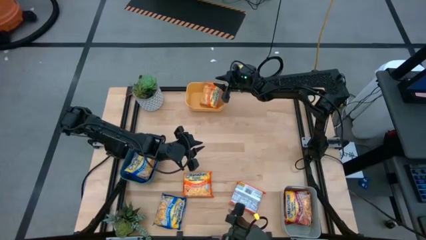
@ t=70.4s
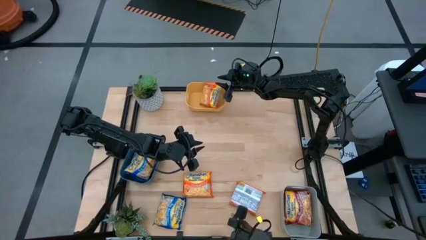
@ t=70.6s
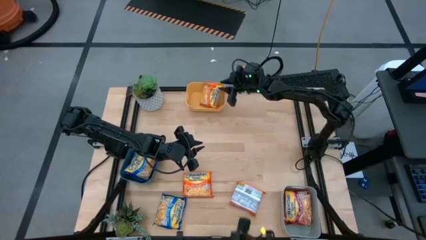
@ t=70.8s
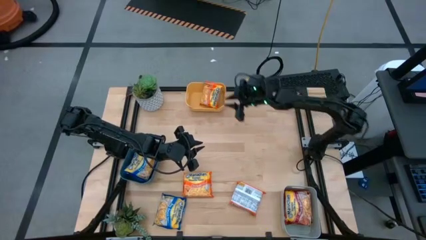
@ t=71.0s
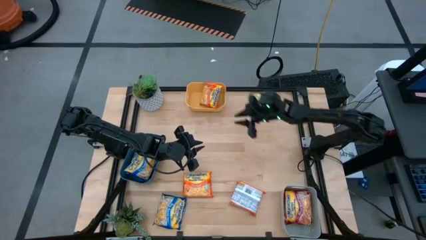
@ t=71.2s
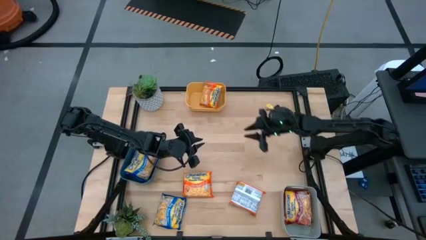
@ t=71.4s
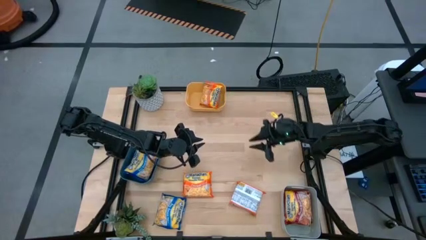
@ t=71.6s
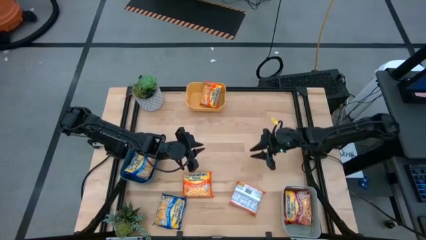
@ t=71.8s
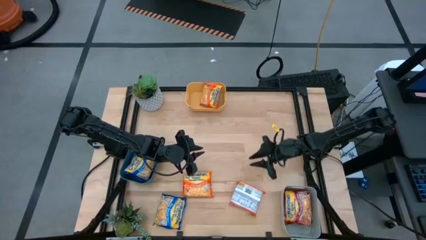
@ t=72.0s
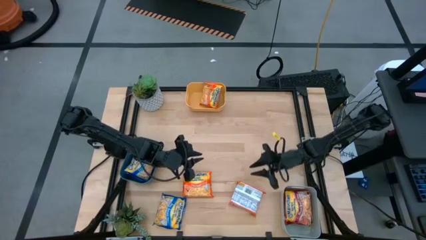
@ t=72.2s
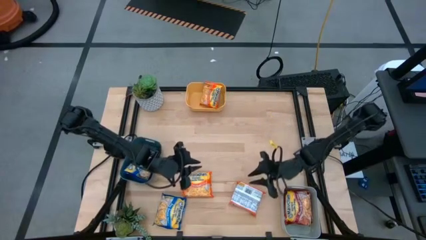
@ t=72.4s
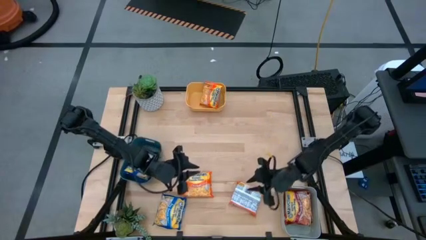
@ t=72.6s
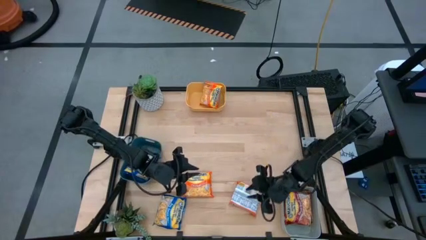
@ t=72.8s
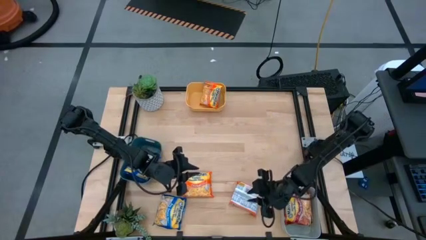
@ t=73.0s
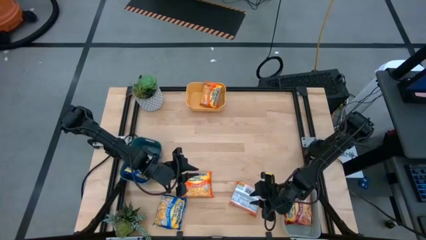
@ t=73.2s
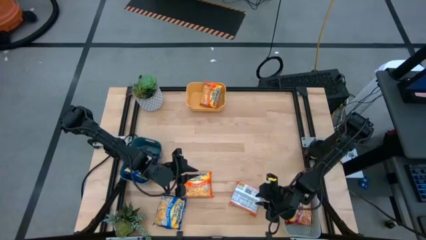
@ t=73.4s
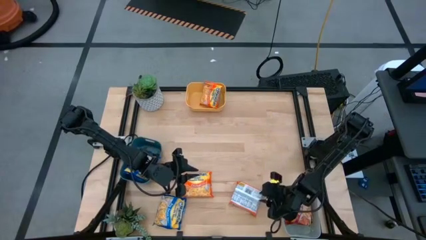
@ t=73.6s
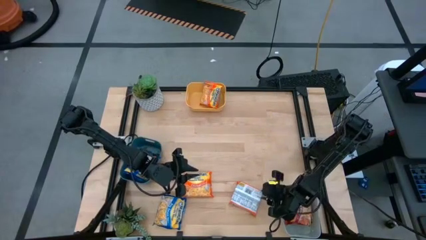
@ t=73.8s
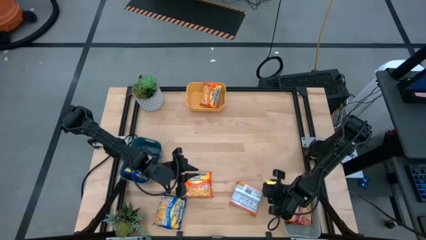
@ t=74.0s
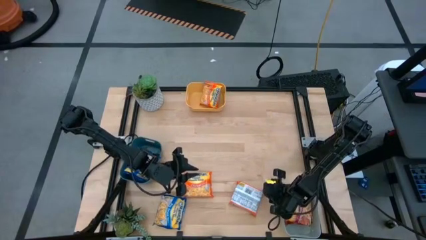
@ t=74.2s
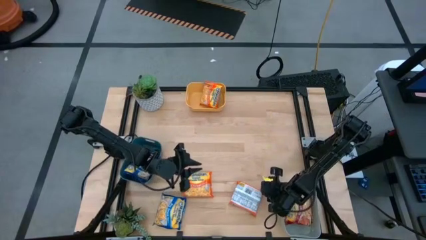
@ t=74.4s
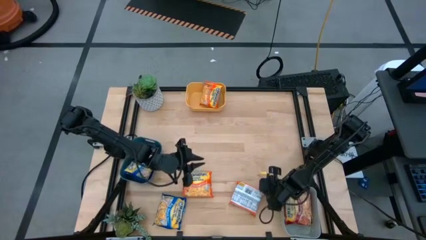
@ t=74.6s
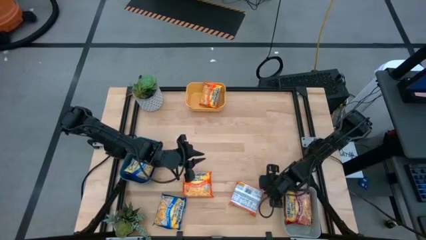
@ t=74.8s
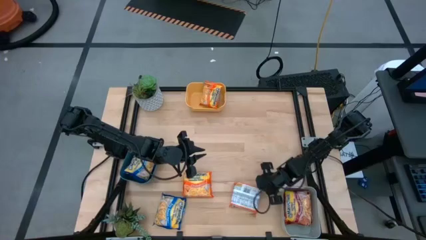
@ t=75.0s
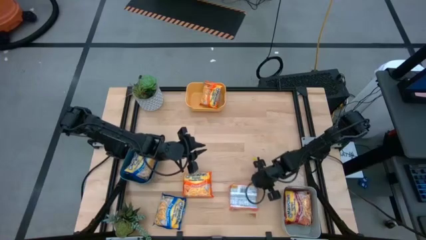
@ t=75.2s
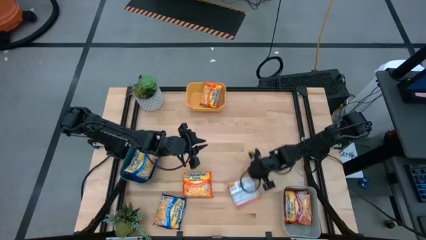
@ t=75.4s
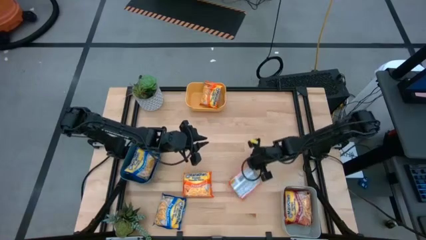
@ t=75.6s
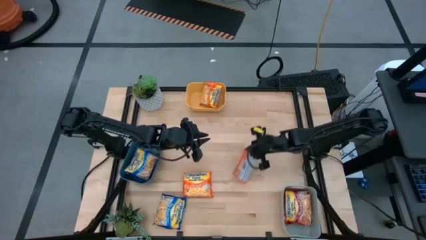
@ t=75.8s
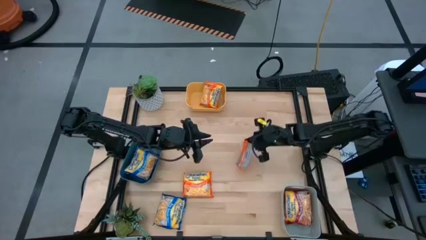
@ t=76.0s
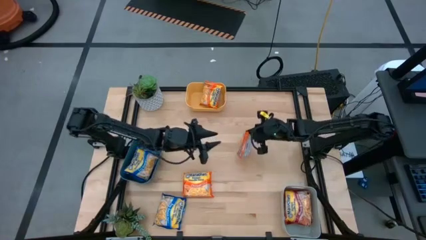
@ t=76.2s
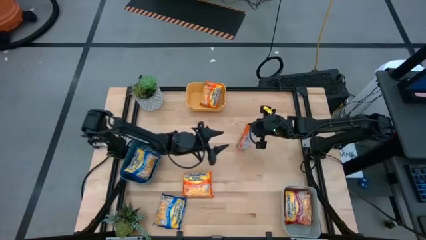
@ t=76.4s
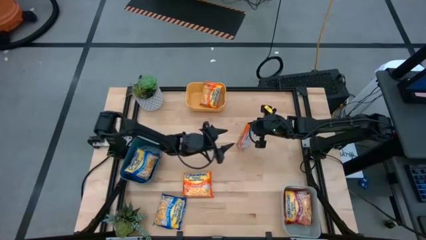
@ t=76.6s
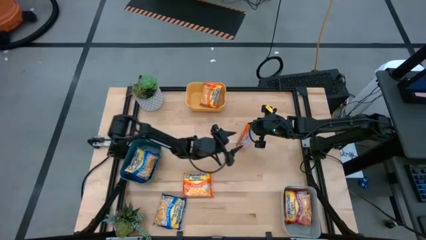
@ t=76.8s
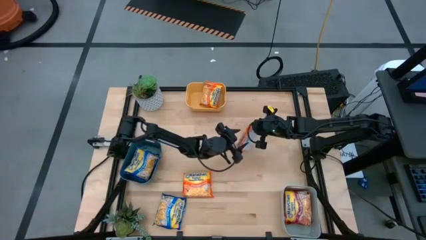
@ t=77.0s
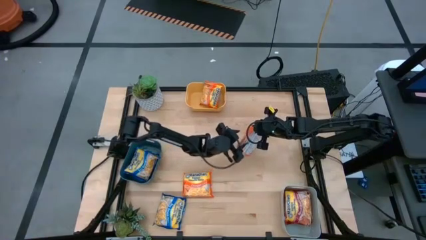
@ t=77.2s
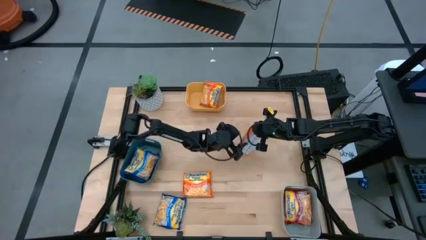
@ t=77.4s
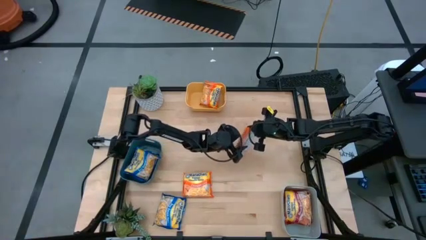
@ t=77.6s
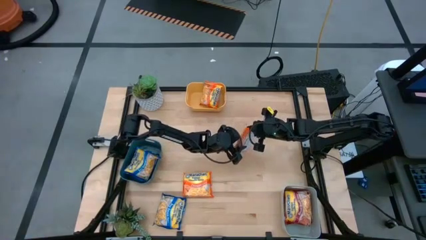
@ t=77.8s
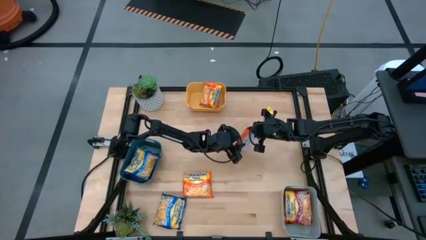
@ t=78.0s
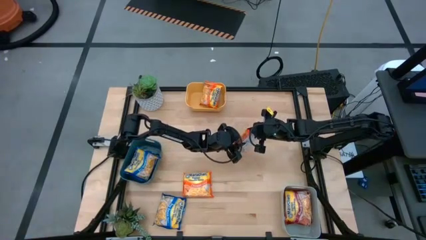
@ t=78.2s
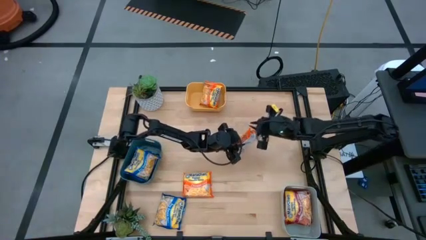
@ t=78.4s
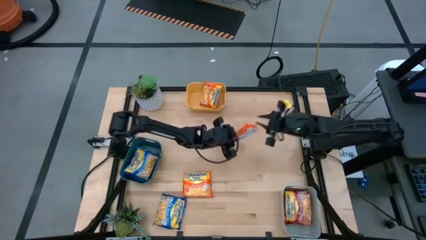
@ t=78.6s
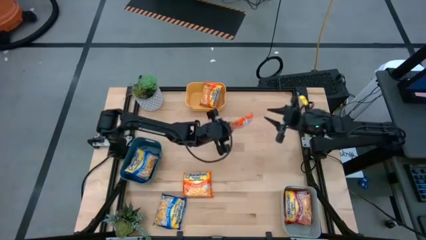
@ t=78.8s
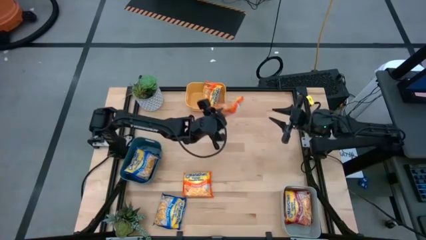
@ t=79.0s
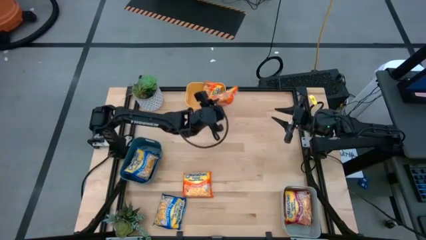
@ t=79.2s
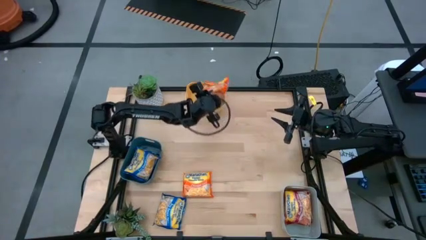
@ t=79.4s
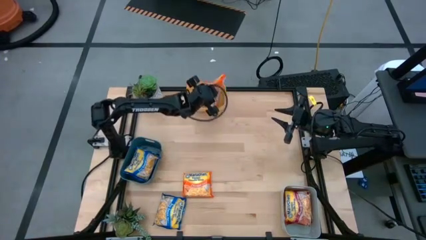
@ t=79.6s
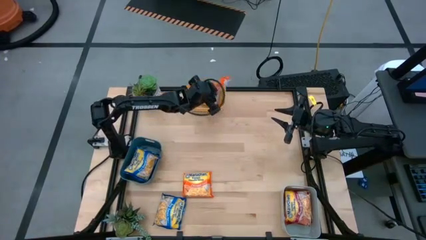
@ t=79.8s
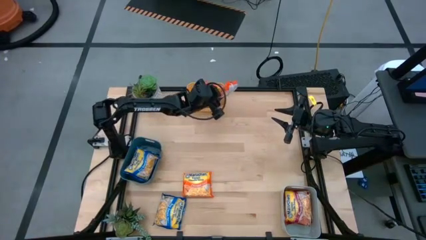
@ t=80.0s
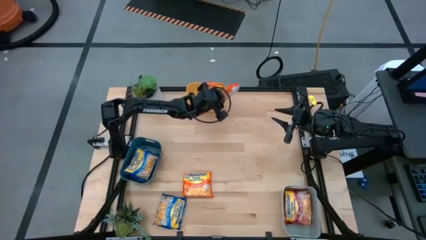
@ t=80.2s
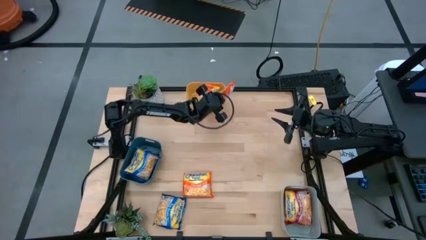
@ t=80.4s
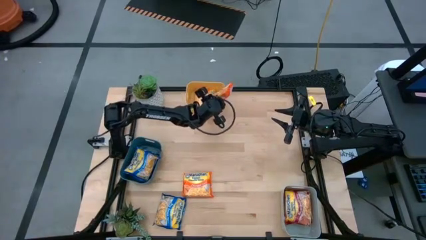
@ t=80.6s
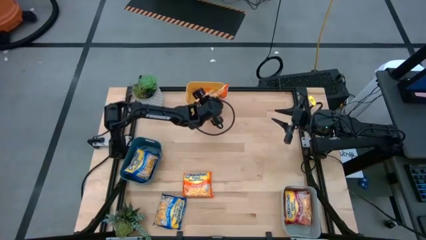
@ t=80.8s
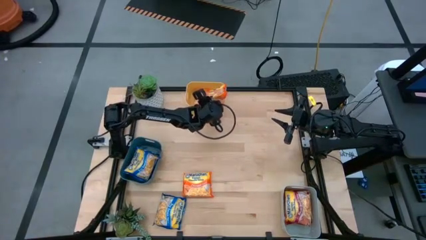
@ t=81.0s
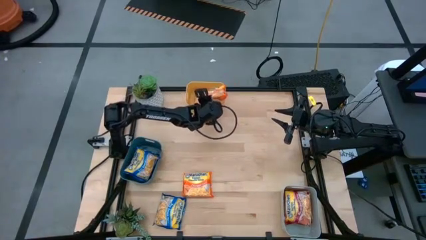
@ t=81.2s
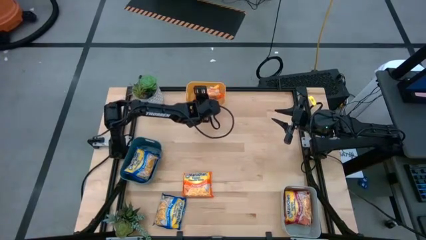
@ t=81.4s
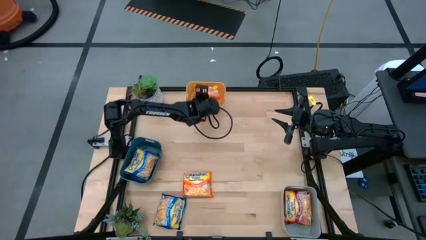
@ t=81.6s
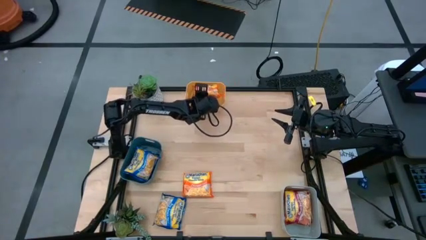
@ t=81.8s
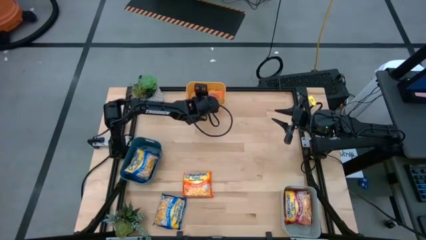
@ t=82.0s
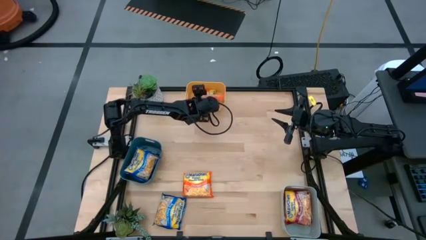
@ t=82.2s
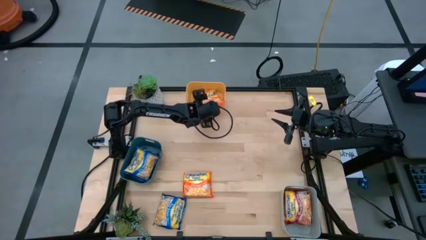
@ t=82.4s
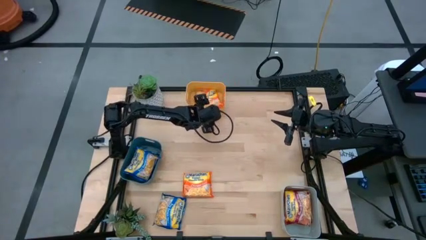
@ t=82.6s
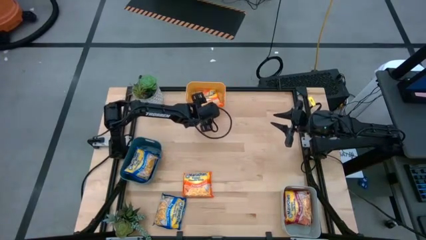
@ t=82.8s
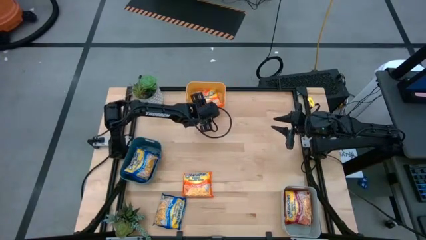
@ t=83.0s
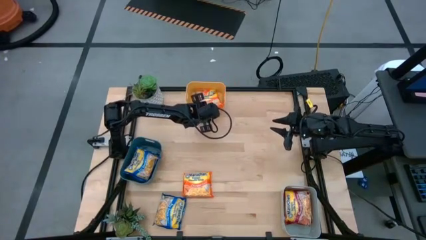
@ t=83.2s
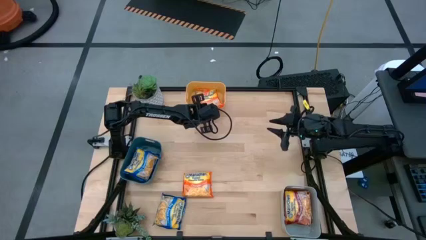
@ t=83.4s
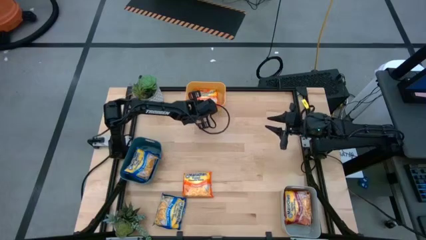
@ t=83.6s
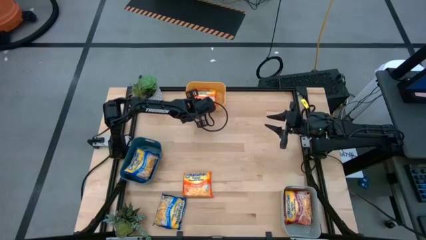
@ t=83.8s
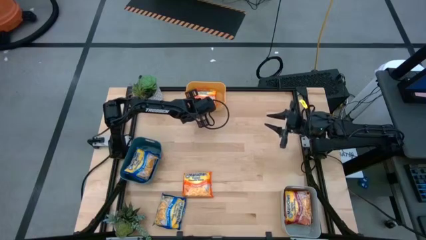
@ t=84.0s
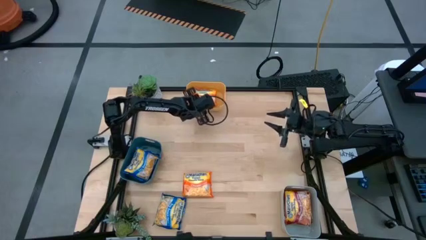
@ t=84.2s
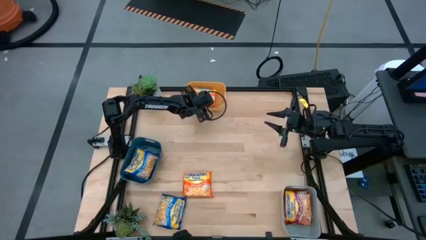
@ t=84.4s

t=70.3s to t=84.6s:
Task: Sort Maruchan noodles
Put the right orange noodle pack into the yellow bin

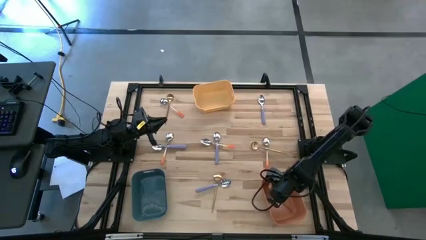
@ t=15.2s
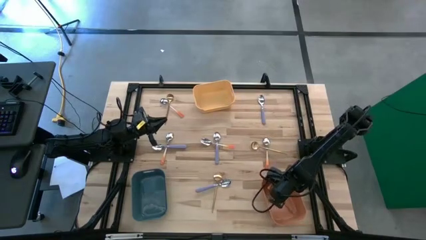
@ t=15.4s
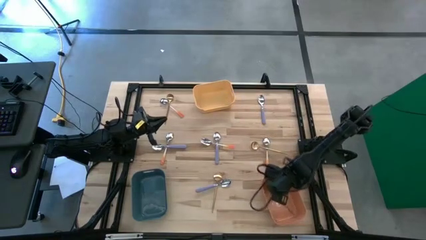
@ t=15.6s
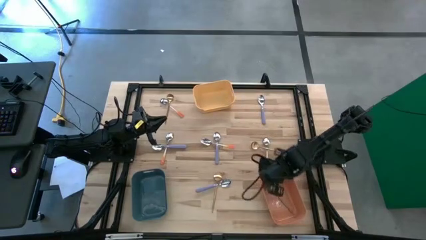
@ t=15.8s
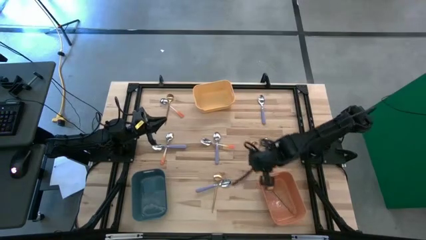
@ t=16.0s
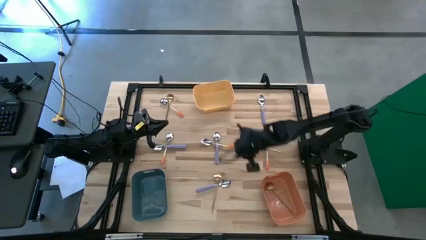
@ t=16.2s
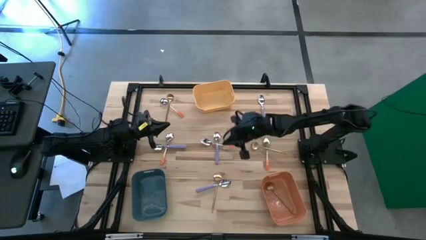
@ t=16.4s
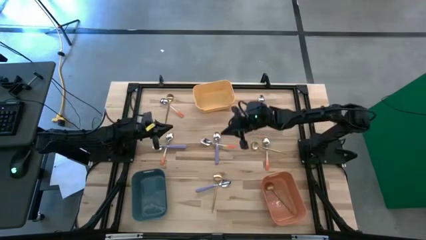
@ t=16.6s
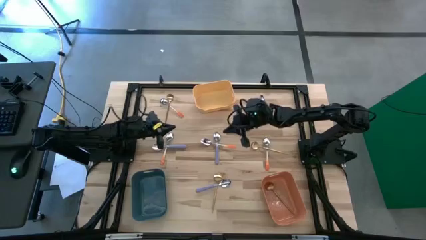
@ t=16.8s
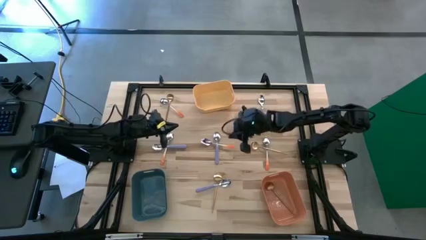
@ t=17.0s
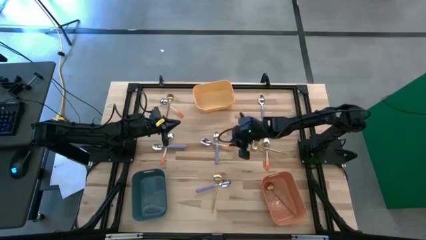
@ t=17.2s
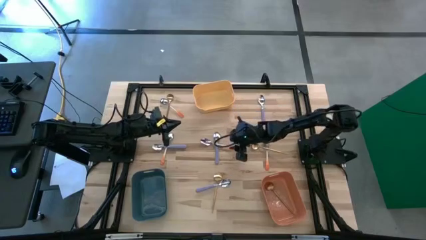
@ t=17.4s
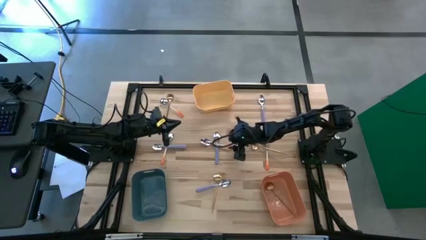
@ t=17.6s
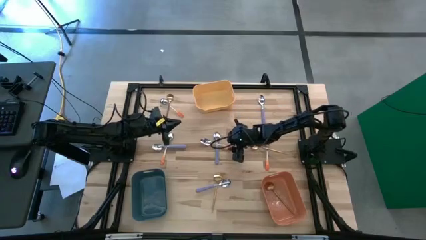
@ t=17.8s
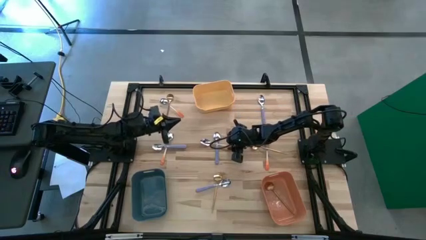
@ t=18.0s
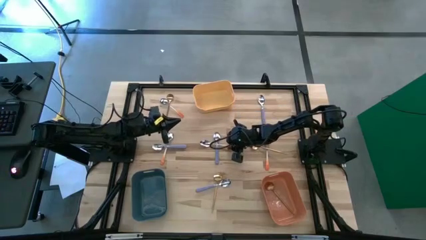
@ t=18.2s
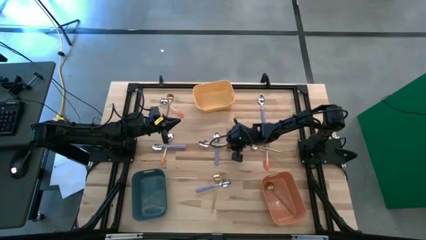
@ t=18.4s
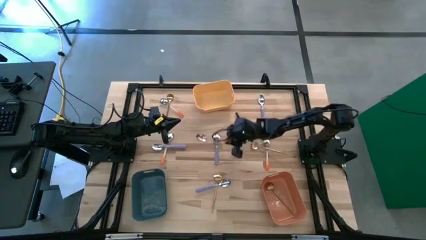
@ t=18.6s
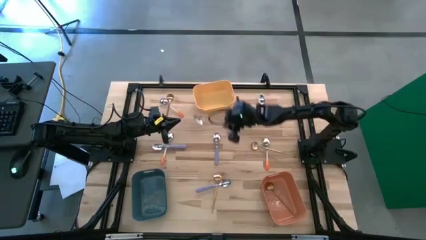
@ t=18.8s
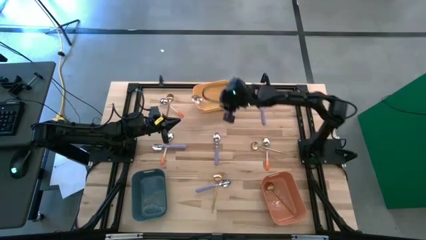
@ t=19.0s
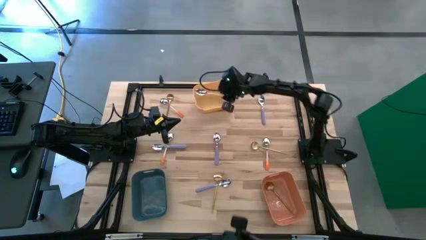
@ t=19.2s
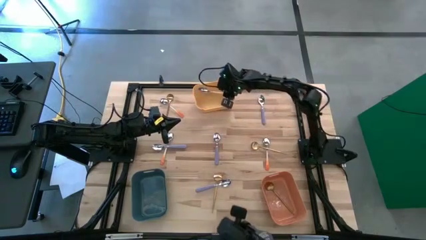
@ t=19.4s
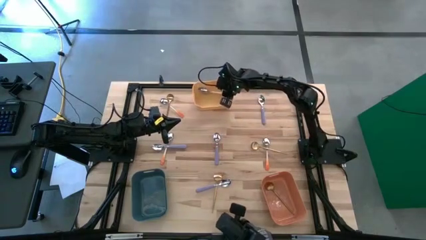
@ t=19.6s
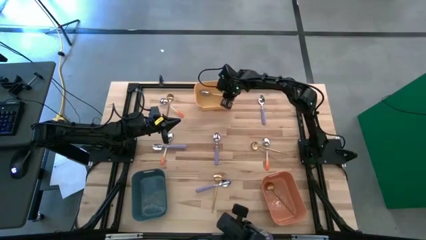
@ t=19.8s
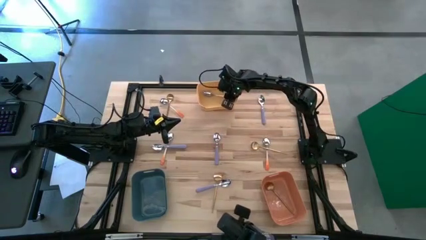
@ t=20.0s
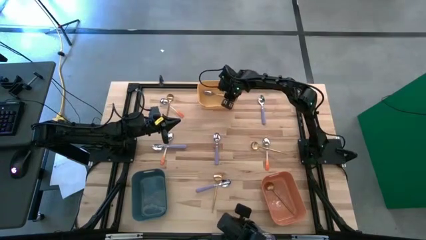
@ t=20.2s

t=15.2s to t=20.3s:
Task: Sort silverware by color (type)
Put the center orange spoon into the yellow bin
